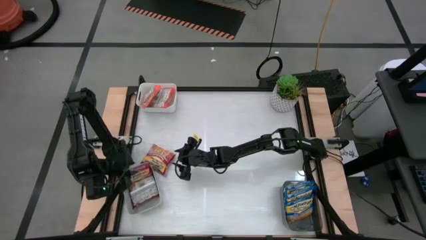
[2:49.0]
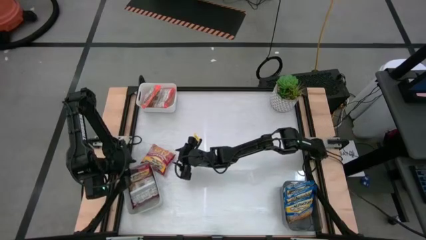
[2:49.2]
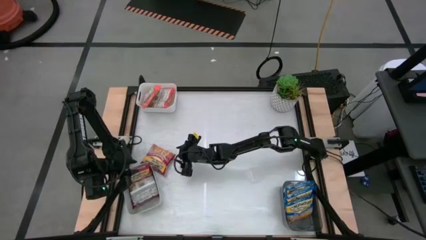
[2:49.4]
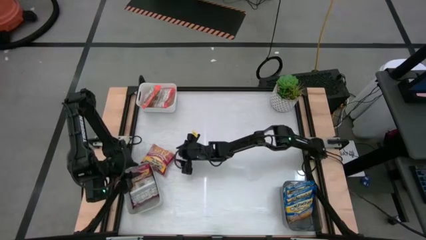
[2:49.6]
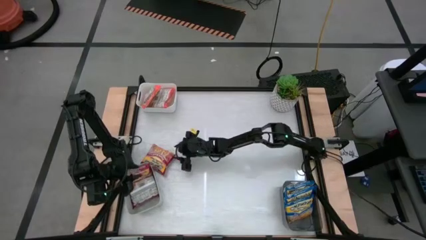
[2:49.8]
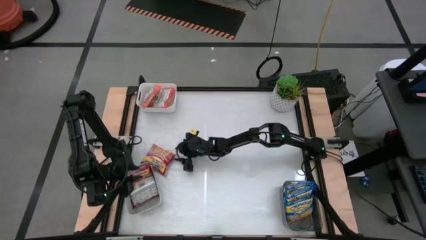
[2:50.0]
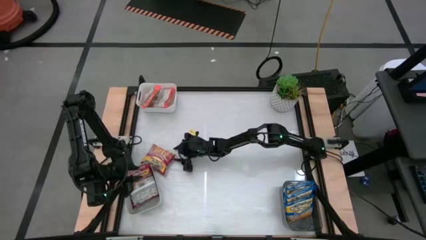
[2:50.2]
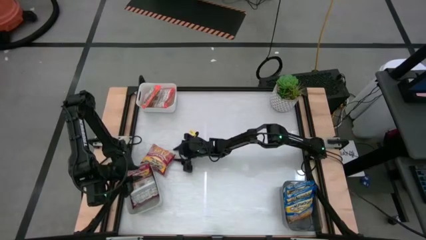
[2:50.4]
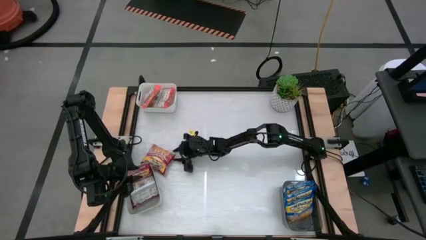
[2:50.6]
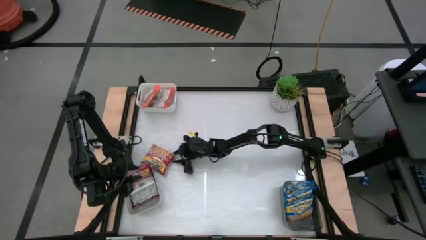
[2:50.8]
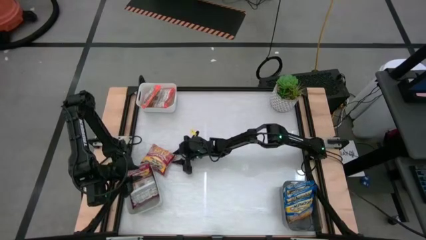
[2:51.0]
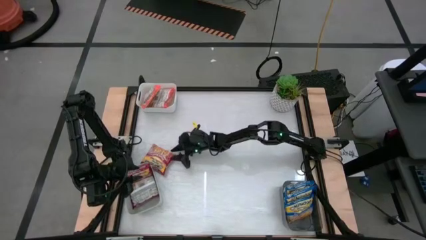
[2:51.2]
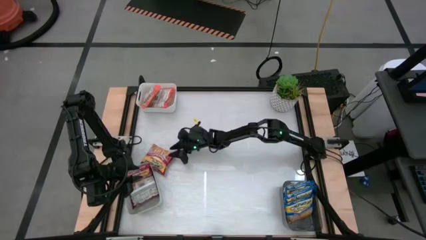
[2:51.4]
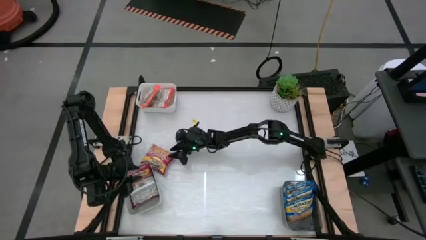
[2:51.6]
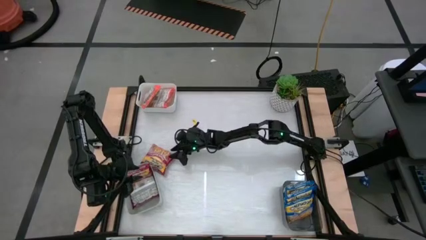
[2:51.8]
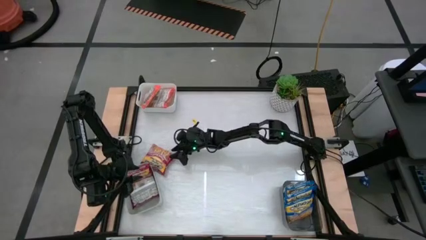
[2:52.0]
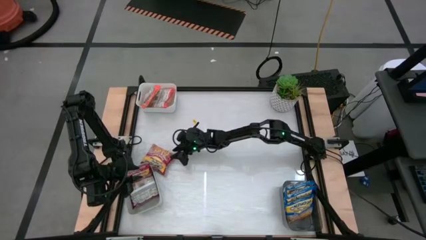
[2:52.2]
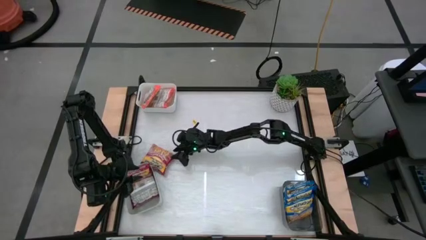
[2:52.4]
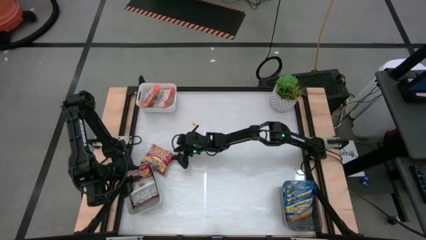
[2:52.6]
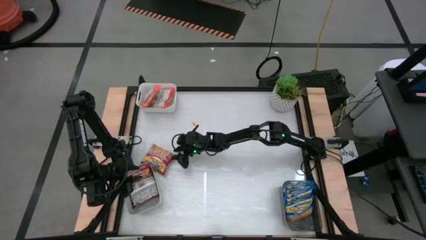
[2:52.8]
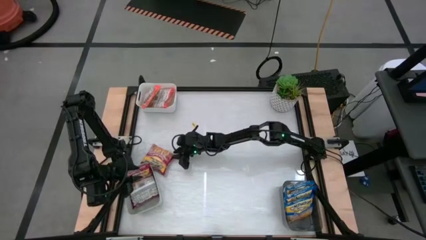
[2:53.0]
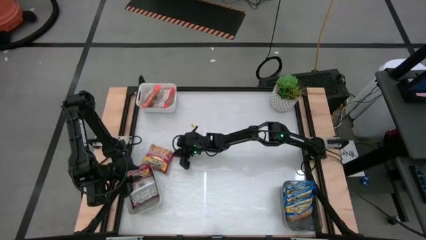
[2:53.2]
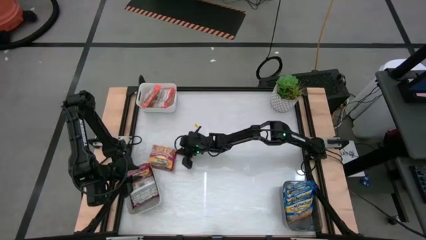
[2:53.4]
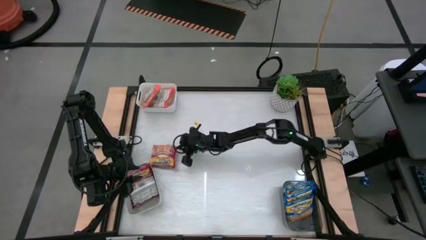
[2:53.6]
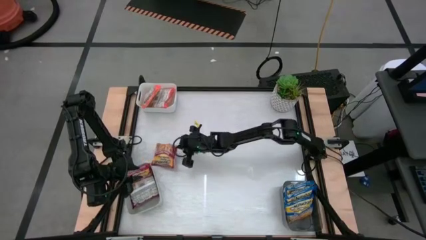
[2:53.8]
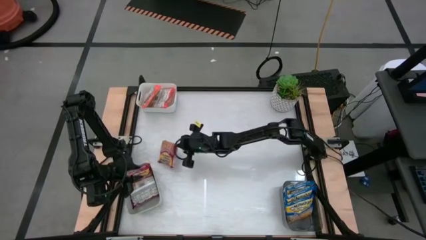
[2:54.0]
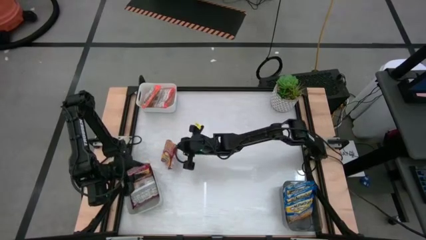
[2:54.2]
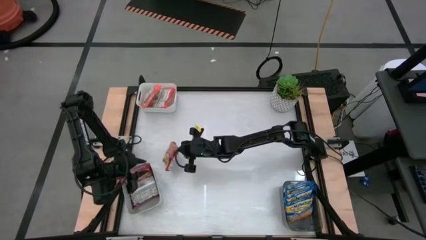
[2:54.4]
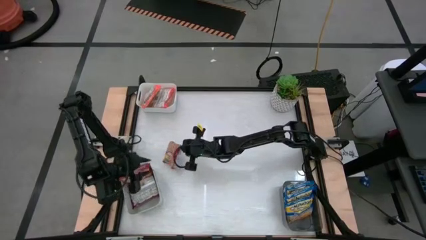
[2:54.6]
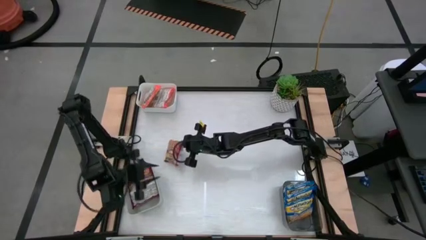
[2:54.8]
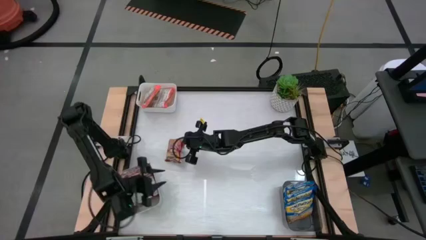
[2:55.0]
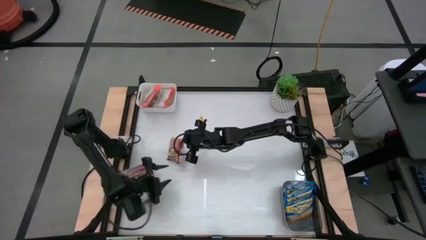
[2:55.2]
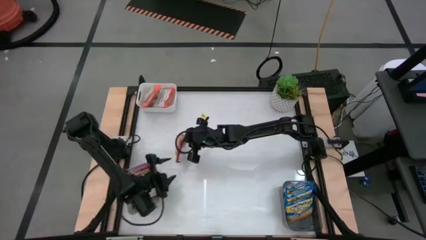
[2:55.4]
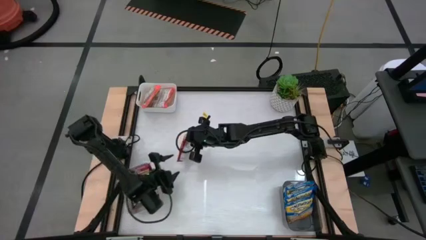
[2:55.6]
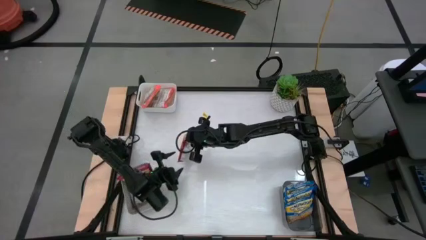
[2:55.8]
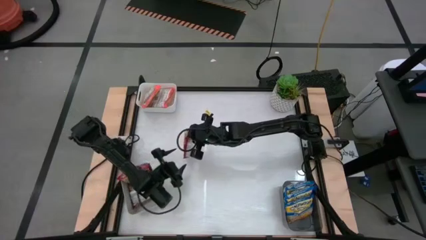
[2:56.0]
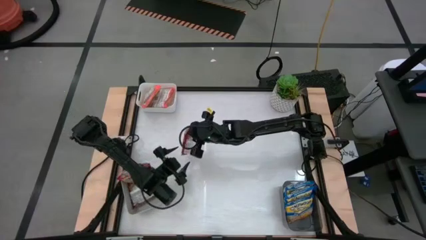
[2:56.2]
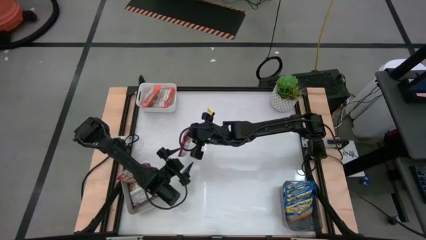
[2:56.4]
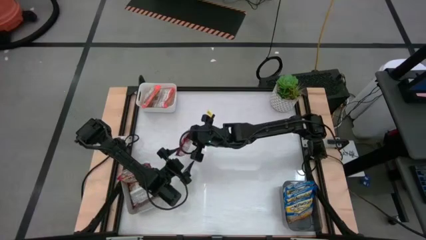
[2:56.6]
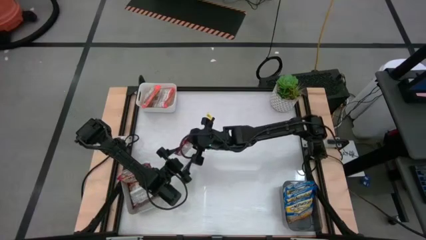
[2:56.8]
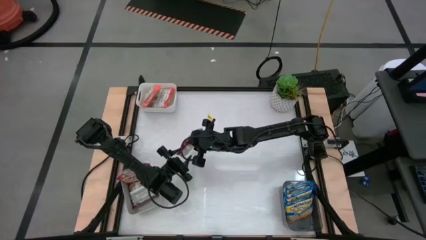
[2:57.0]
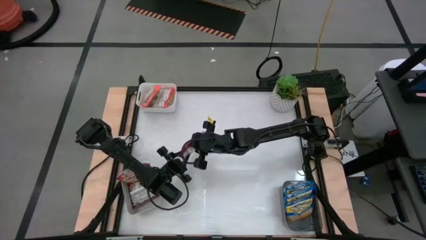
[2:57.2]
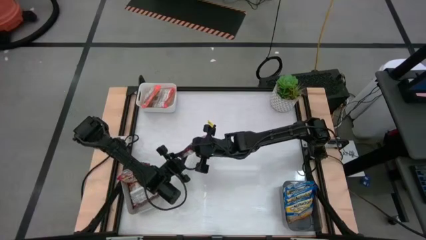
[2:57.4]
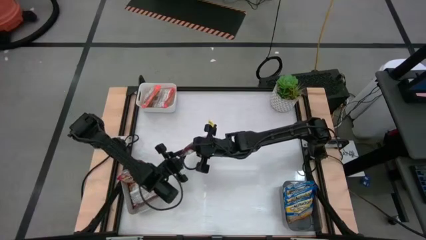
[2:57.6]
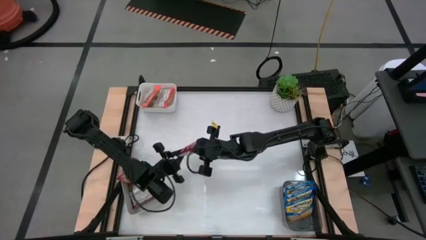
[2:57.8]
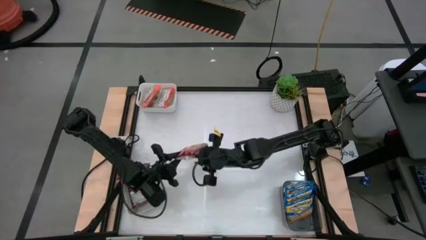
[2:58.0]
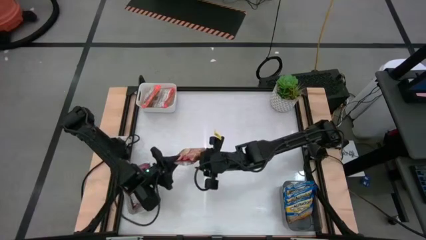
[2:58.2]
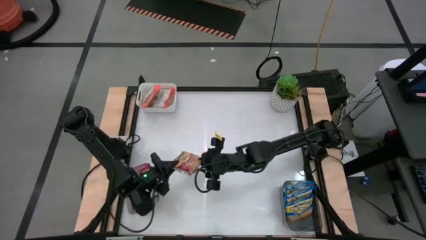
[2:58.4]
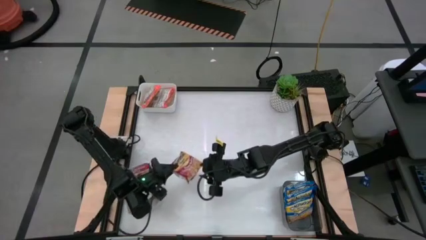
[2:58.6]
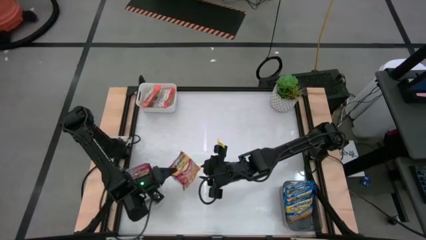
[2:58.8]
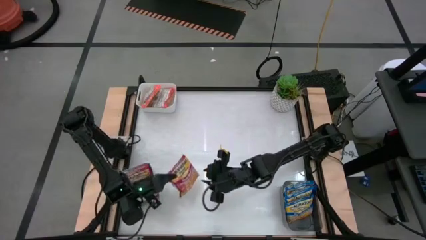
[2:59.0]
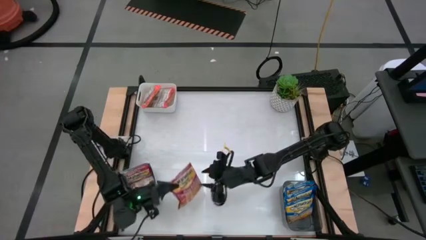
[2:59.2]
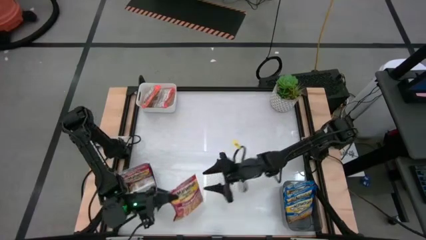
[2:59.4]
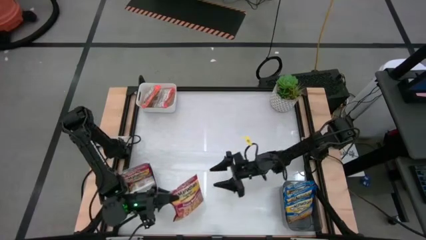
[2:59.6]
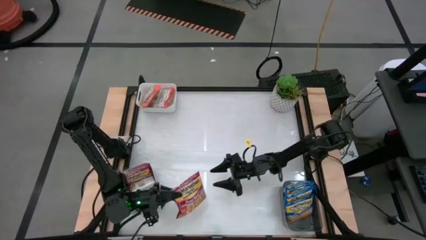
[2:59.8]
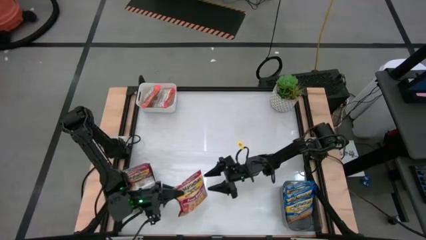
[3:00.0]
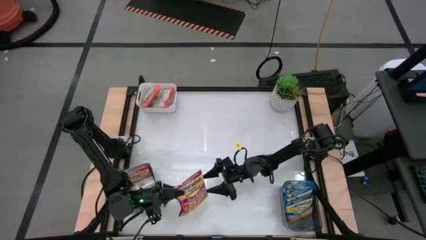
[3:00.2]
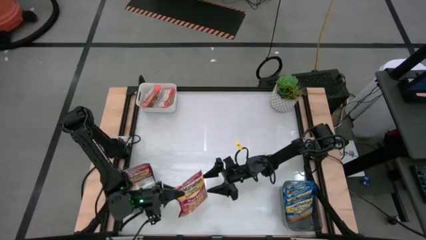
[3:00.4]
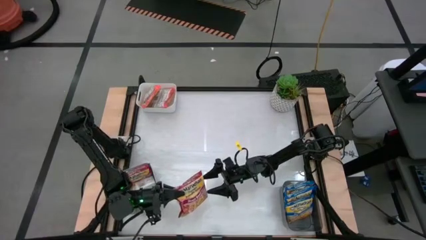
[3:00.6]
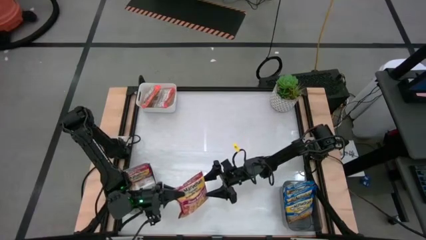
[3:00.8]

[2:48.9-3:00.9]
Task: Sort Maruchan noodles
Put the red noodle pack into the gray bin

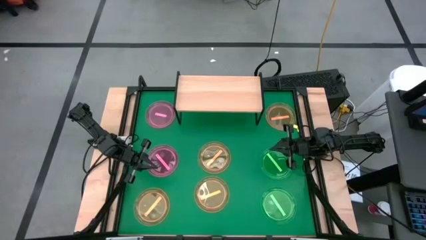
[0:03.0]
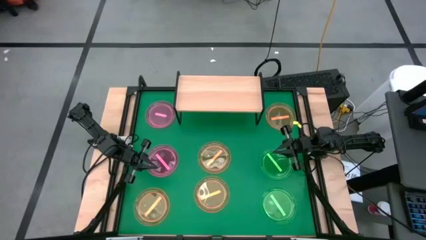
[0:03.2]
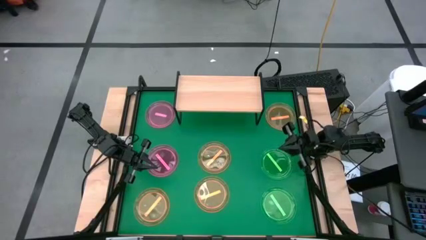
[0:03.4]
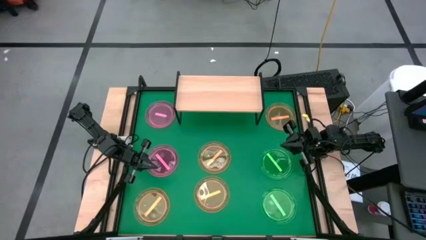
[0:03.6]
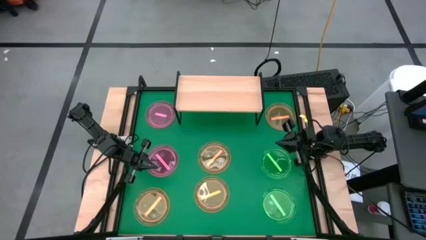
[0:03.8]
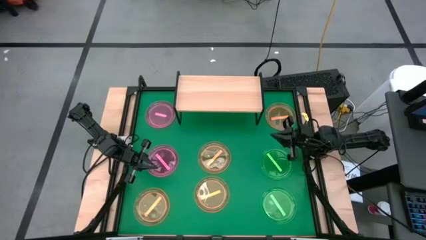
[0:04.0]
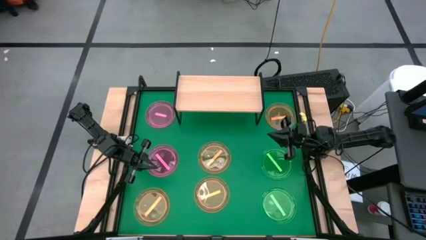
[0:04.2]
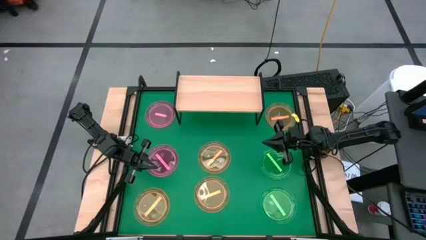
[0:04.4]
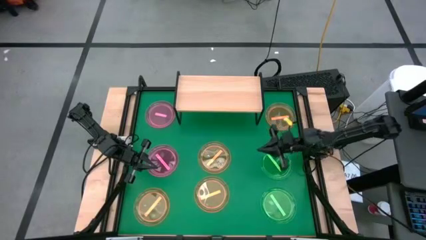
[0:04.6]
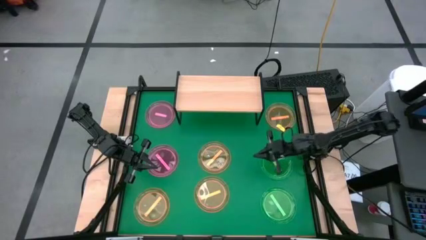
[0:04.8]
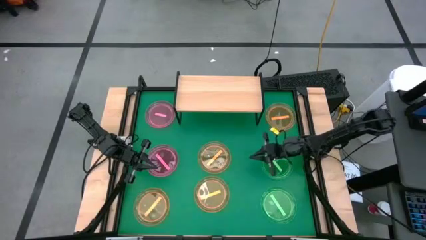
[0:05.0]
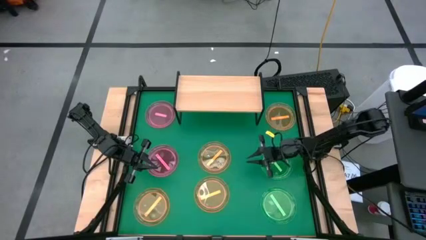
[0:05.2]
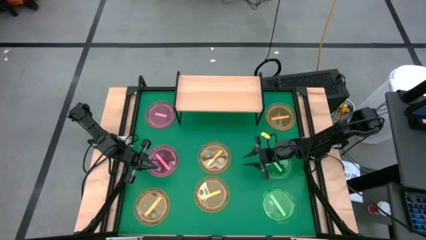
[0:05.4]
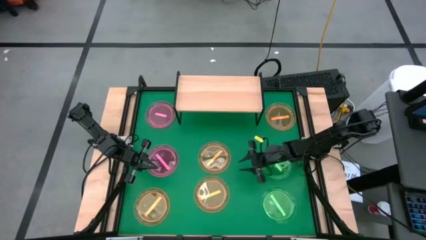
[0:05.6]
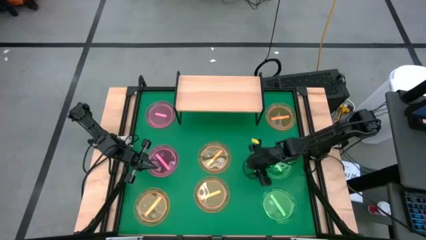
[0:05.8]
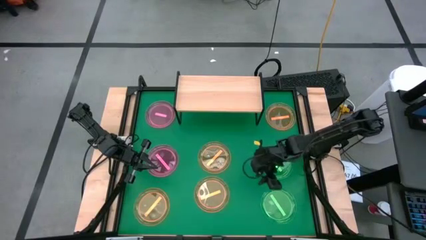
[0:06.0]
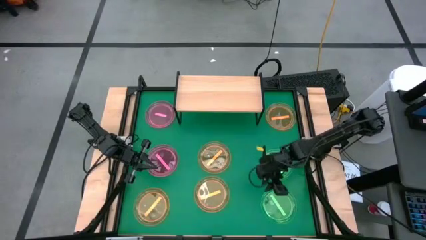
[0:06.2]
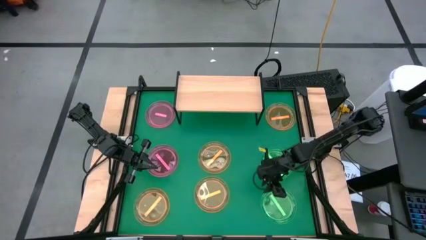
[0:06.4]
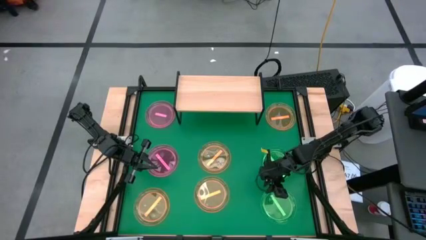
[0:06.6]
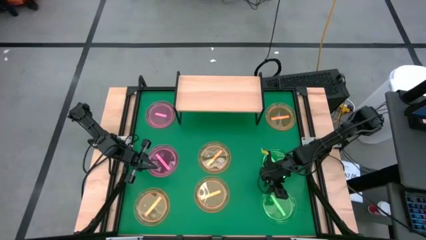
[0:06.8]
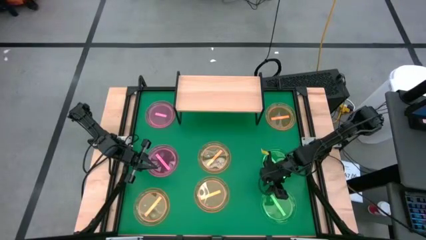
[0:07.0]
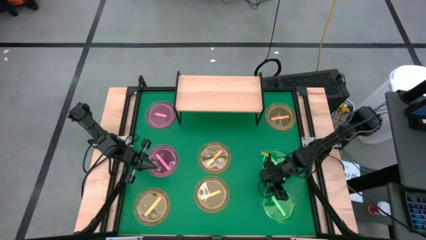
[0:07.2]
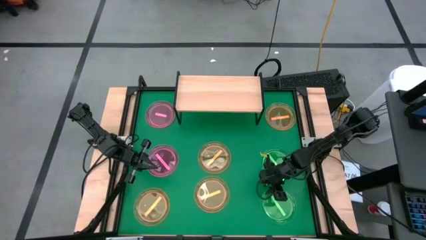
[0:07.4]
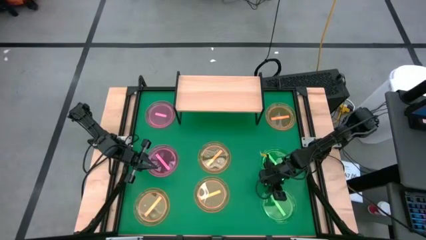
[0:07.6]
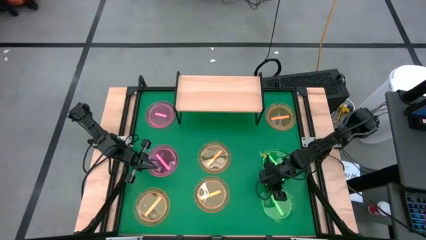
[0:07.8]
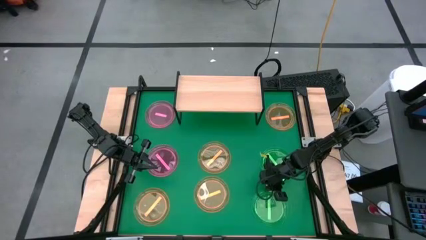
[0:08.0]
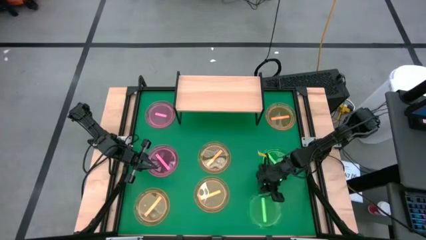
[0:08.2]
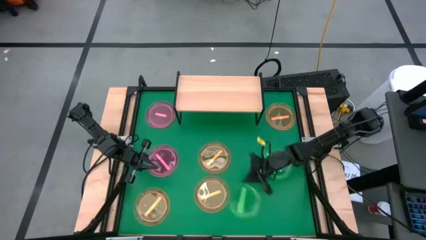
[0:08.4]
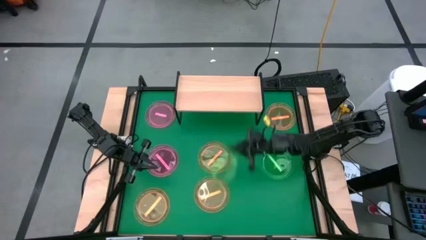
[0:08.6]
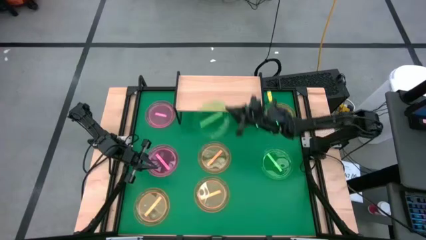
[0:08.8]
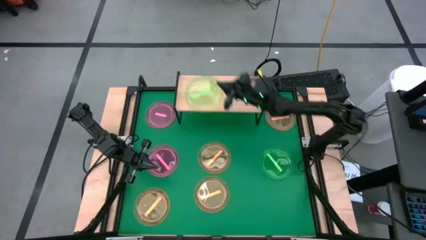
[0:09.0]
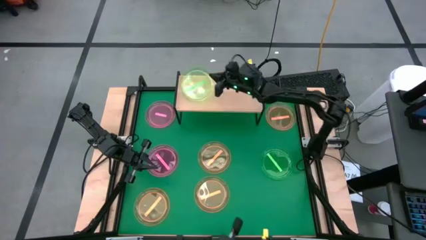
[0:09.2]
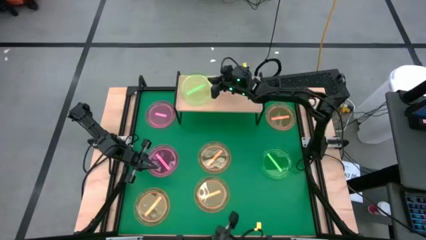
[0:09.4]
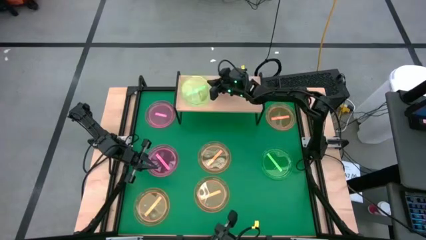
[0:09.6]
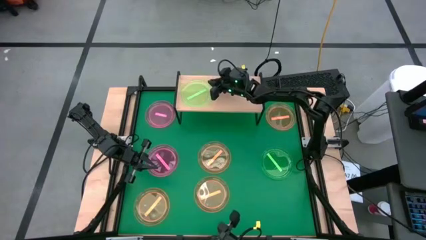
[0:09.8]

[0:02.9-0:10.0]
Task: Place and stack plates onto a shelf
Put the bottom green plate on the shelf
